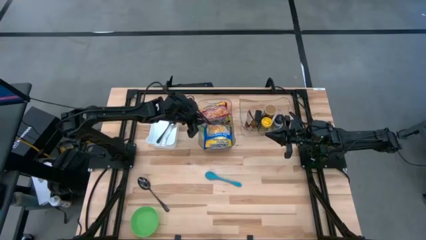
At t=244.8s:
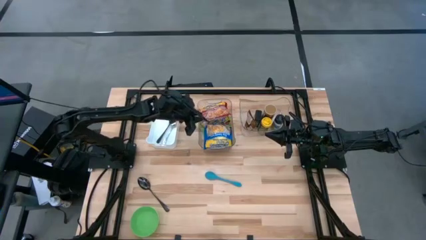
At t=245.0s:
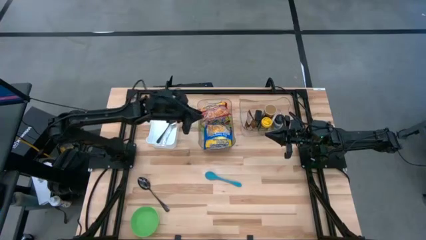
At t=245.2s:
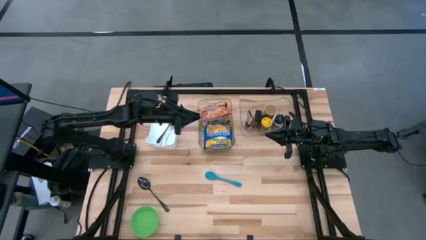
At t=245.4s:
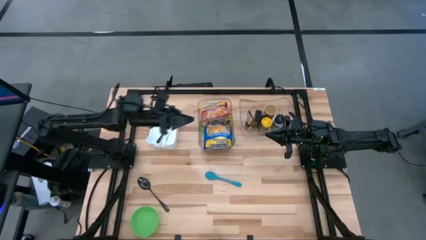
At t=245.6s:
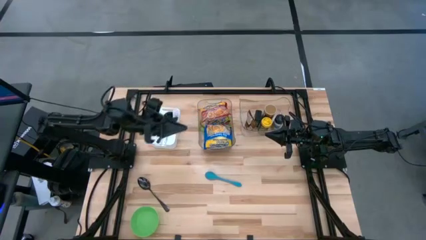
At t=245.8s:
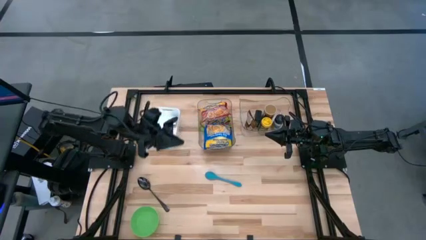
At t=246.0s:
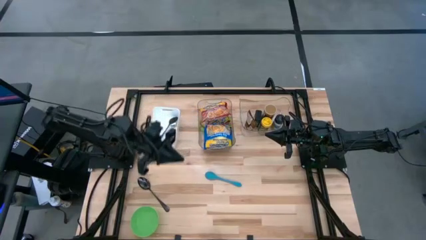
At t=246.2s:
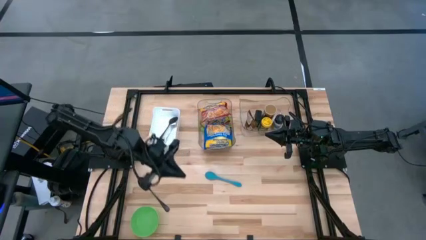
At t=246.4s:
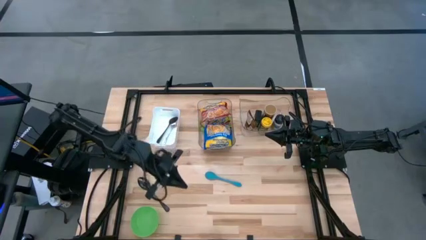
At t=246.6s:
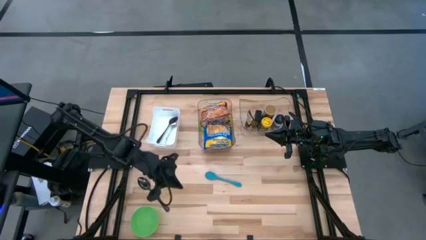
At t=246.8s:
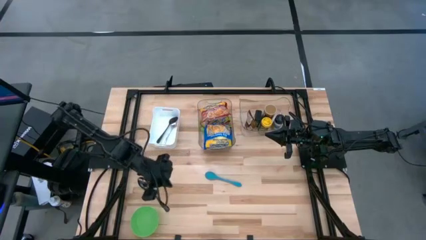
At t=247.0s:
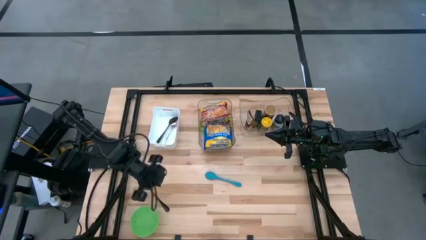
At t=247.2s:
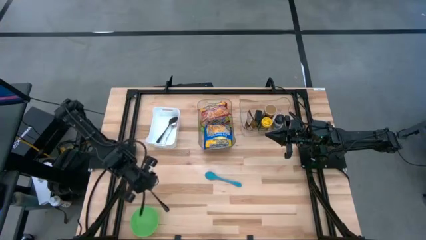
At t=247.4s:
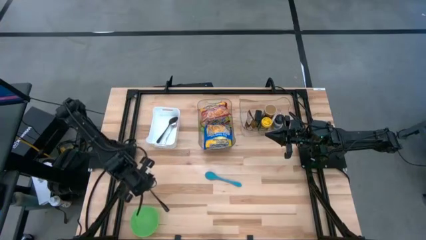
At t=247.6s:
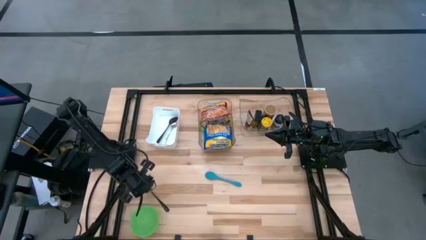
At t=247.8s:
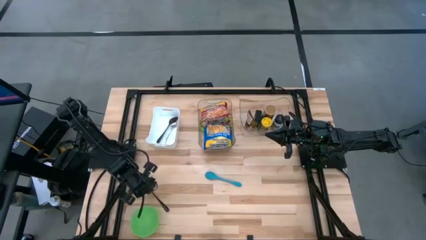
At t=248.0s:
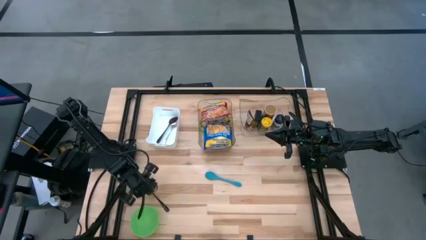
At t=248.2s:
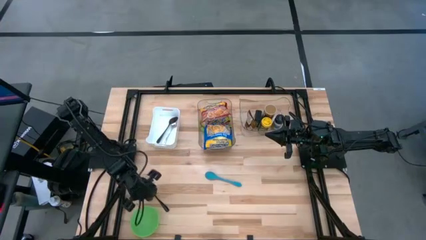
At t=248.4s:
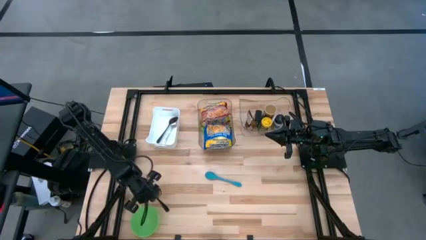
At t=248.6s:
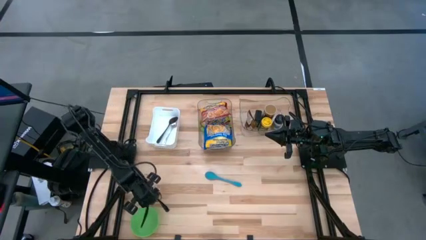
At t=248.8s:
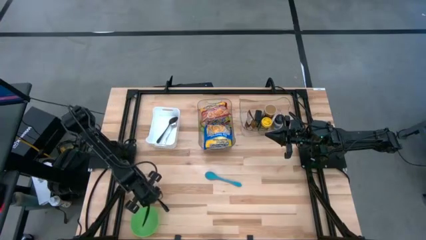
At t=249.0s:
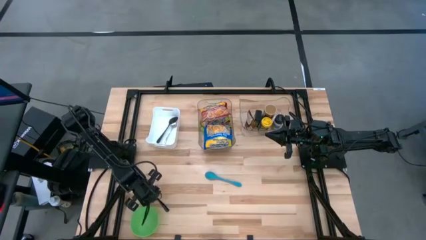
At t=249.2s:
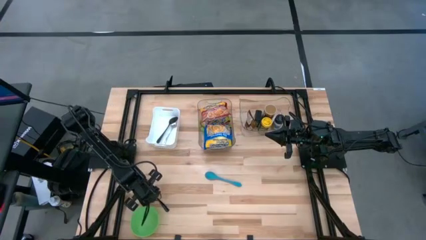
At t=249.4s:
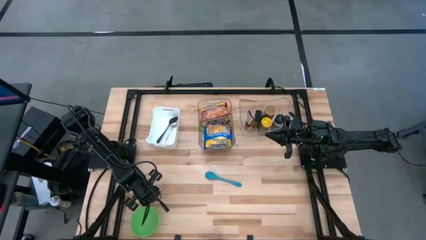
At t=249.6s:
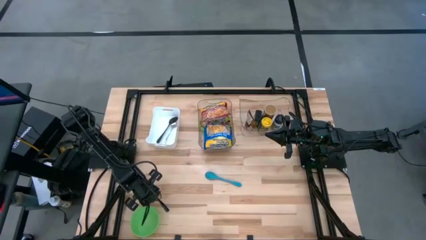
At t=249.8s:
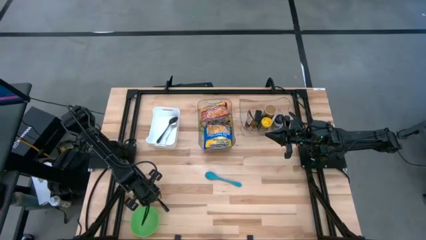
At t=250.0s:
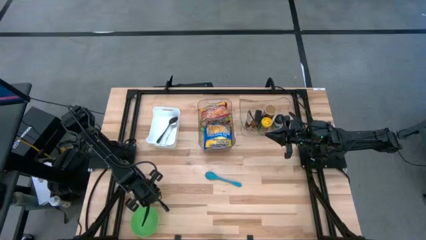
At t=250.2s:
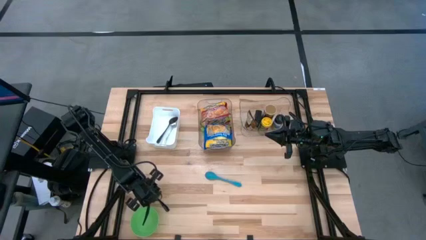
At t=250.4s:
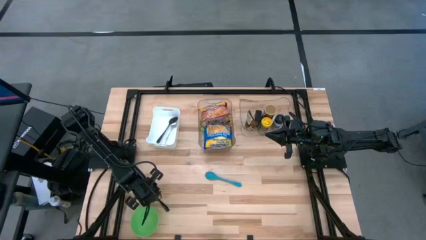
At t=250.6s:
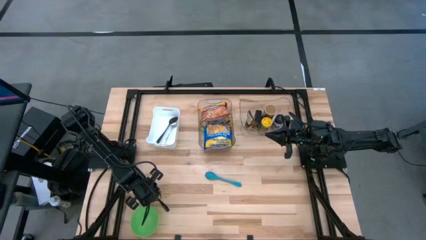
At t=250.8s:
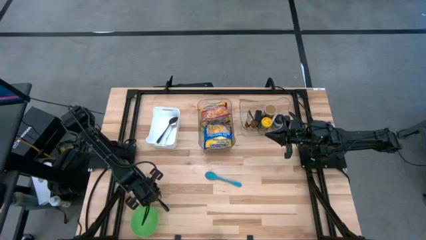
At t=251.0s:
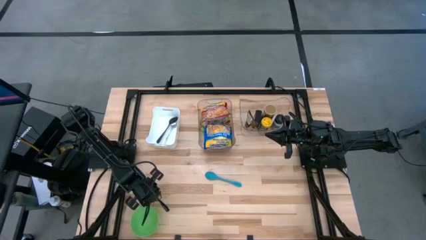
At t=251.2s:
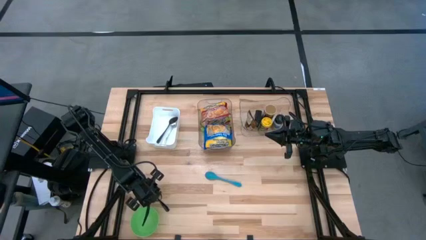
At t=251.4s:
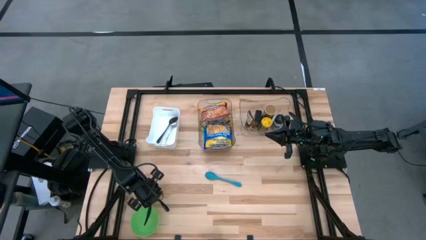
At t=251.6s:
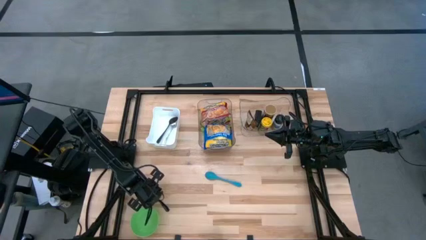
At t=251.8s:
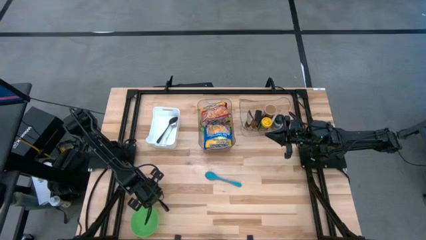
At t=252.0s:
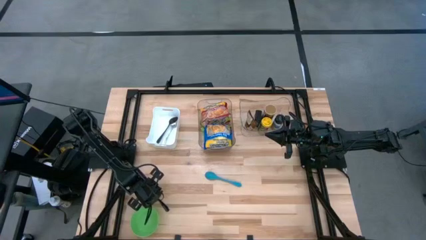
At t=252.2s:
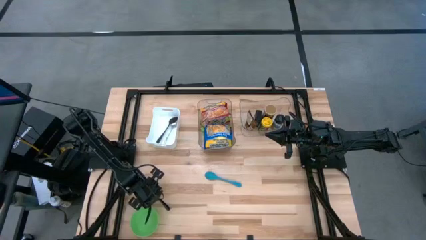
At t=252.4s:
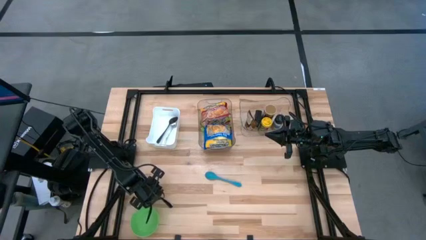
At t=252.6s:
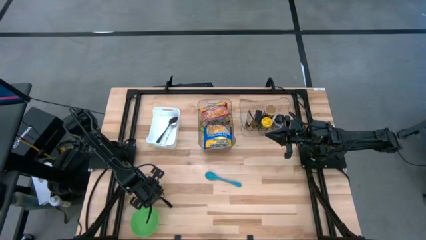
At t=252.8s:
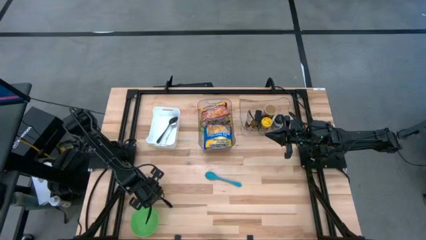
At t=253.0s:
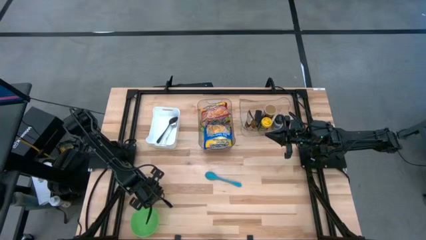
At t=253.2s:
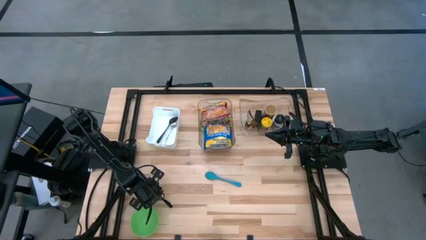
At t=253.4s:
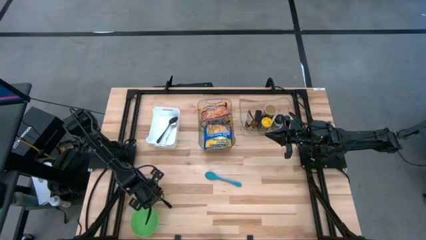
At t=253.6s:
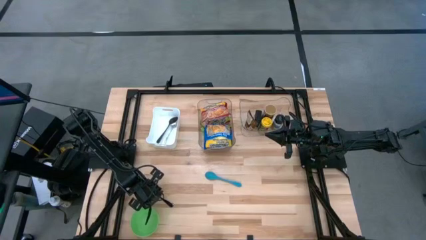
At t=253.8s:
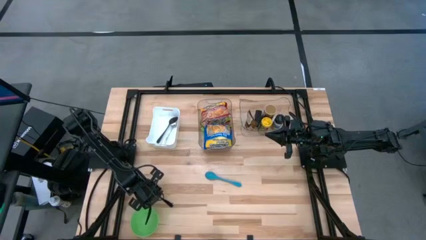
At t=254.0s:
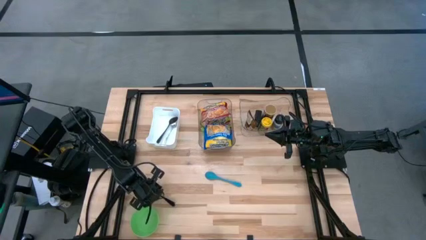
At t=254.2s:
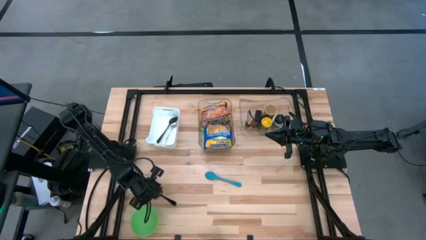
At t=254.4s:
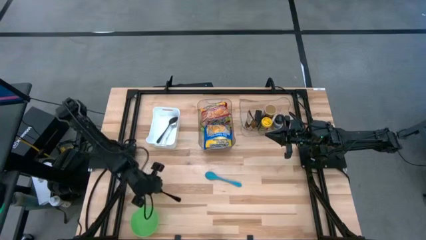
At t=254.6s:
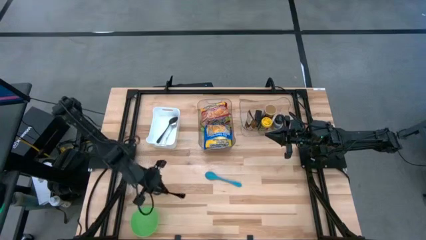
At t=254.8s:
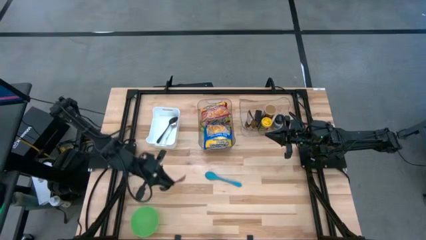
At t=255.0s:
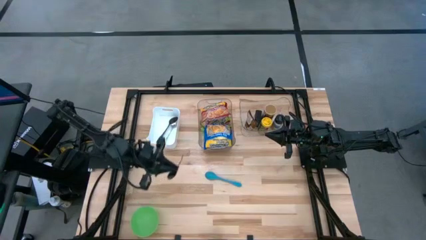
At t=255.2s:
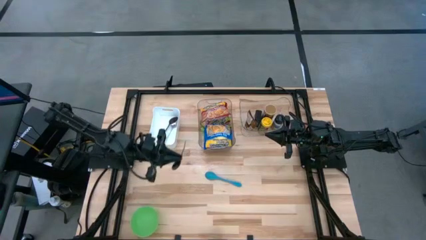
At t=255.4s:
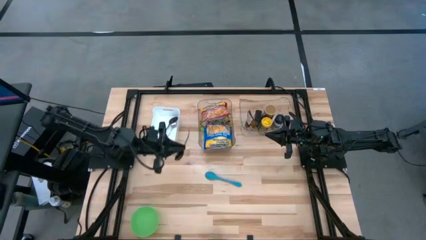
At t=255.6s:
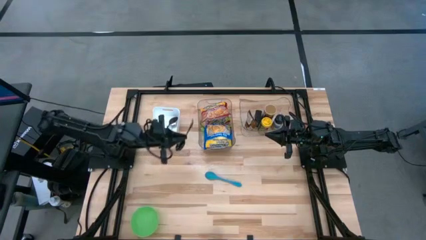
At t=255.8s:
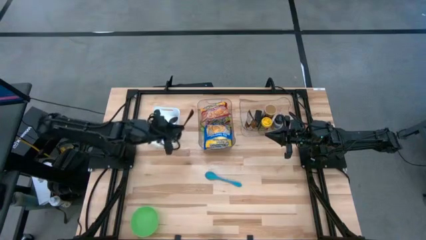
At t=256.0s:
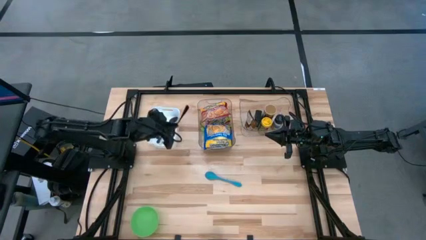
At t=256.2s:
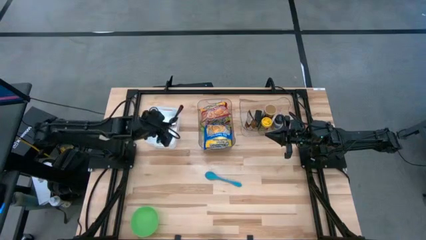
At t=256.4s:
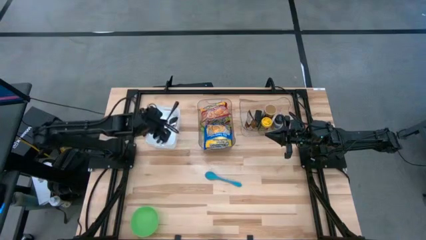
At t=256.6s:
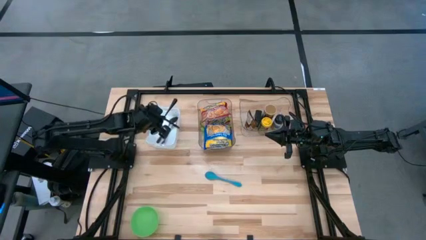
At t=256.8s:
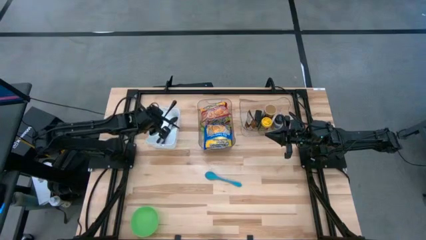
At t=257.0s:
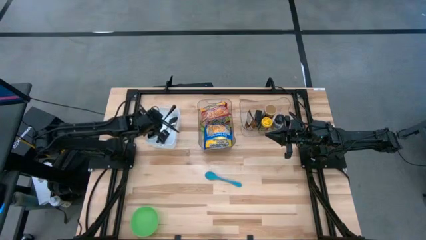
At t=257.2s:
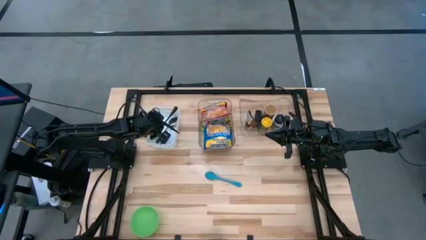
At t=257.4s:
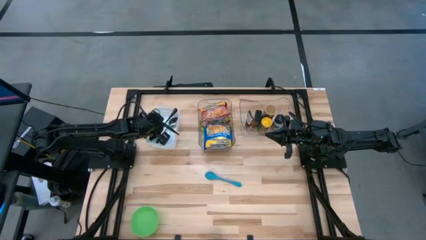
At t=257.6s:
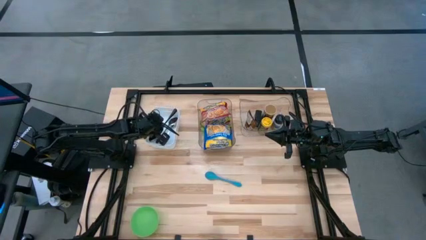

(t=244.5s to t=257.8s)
Task: Pick & Place Food Item
Put the black spoon into the white bin

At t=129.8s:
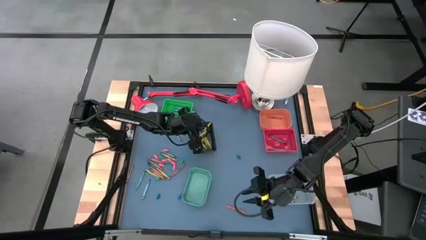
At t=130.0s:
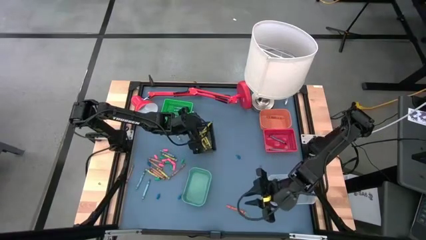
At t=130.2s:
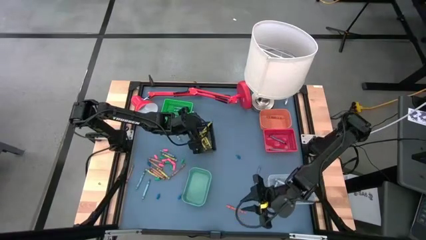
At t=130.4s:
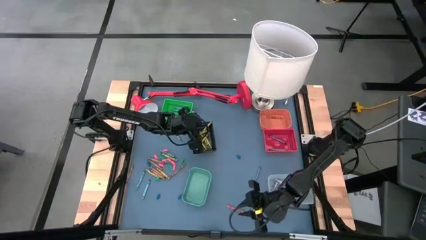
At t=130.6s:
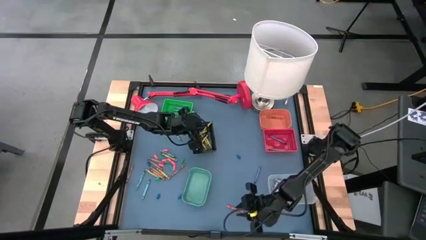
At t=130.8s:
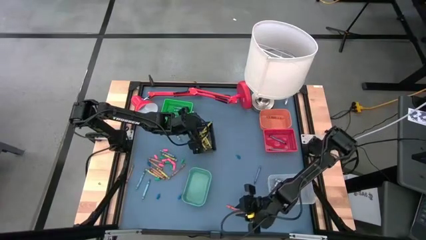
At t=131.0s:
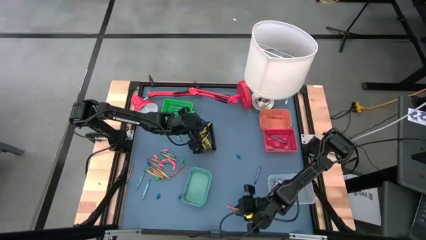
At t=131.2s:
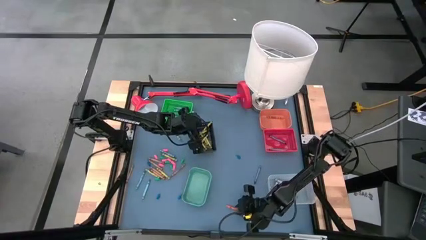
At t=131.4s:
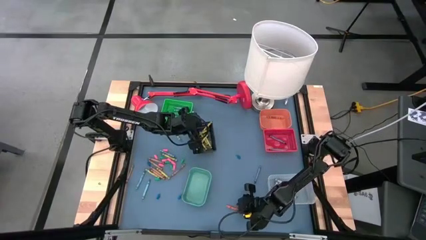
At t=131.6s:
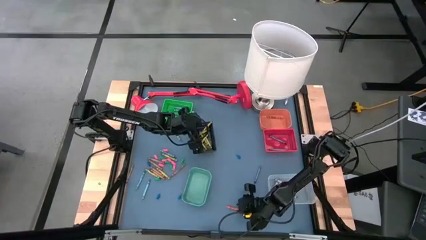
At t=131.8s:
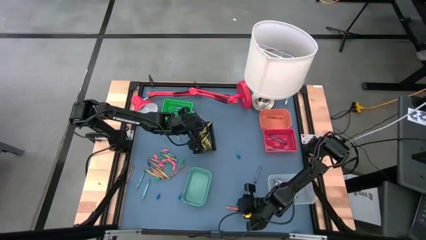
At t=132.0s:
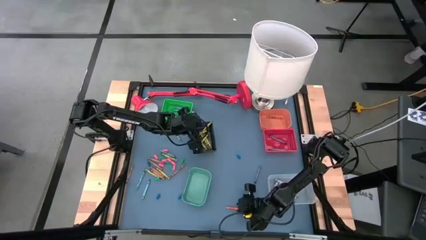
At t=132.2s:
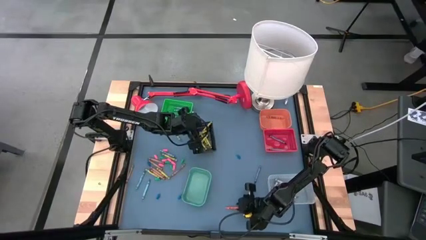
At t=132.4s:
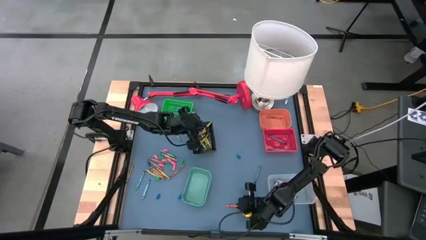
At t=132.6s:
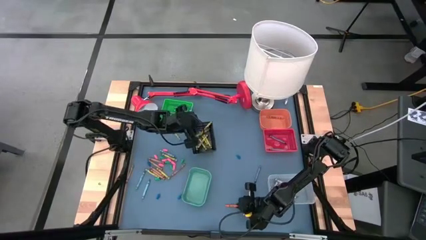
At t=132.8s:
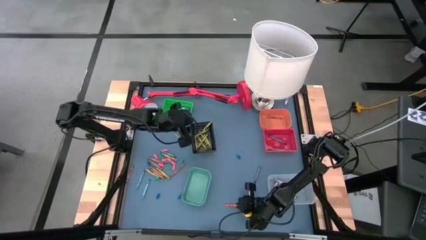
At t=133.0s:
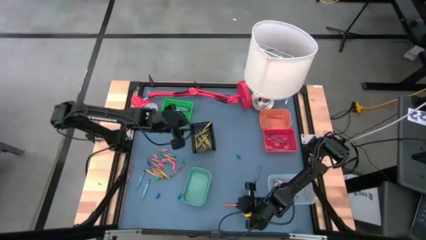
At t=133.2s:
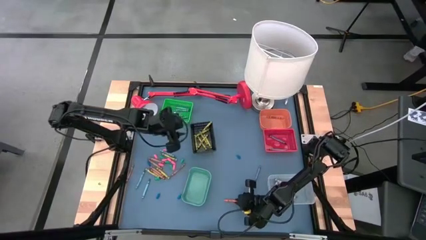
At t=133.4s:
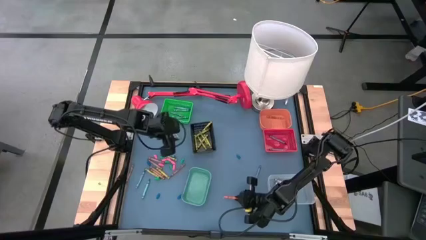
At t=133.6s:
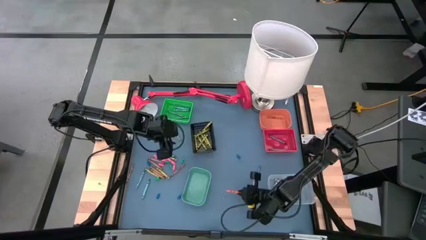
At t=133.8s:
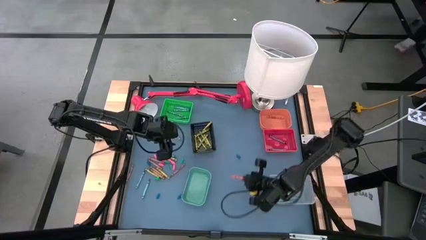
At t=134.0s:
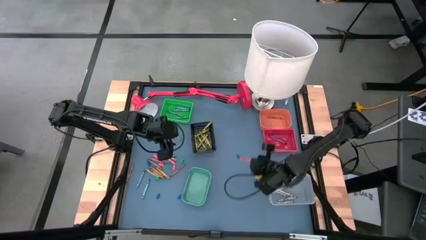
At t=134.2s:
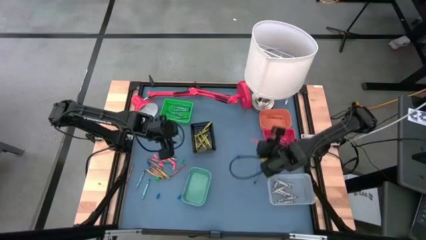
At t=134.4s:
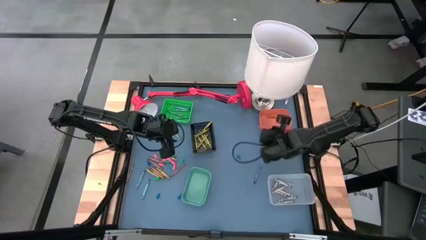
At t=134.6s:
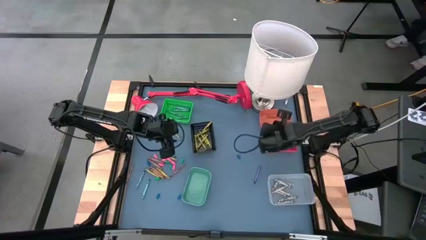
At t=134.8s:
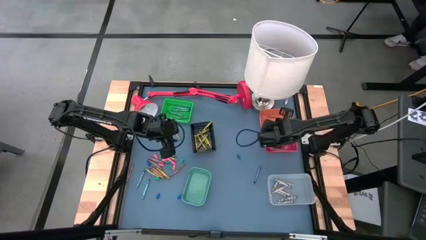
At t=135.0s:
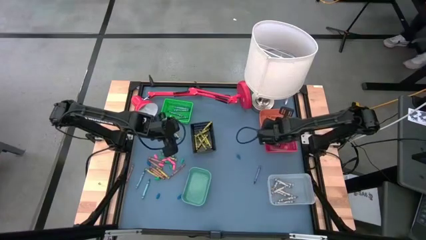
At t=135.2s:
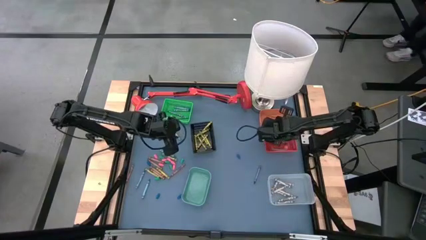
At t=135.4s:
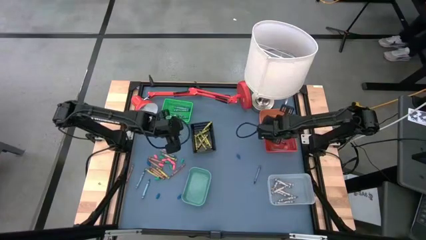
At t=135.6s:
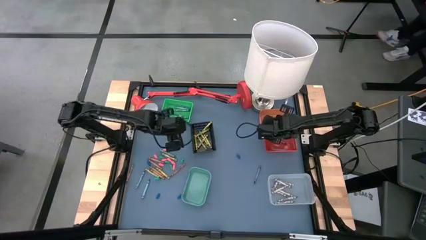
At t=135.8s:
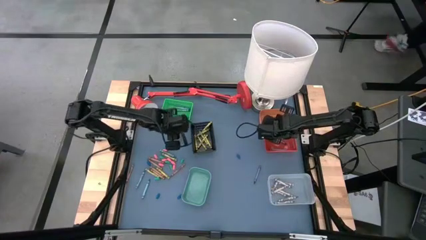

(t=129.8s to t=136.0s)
Task: Sort crayons
Put the orange crayon into the orange bin
